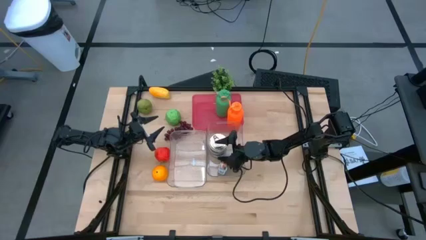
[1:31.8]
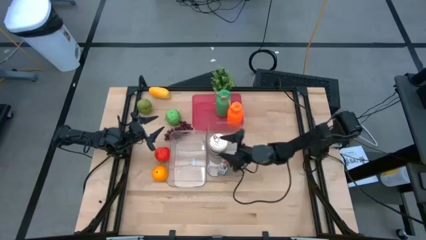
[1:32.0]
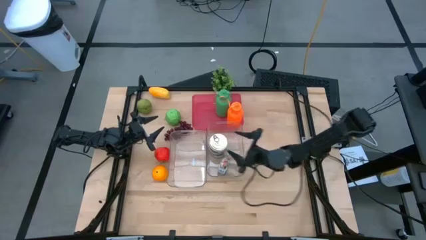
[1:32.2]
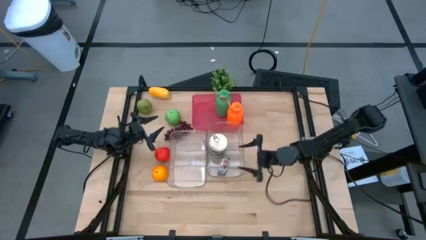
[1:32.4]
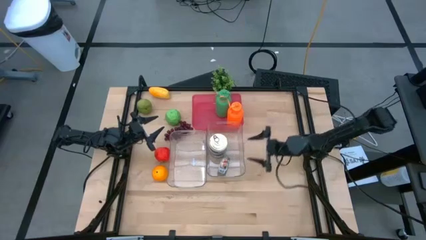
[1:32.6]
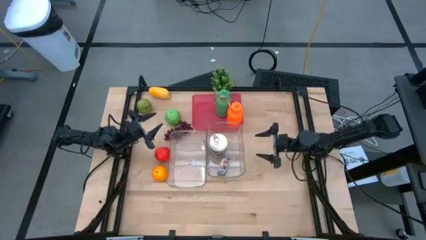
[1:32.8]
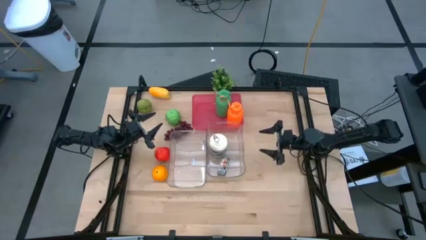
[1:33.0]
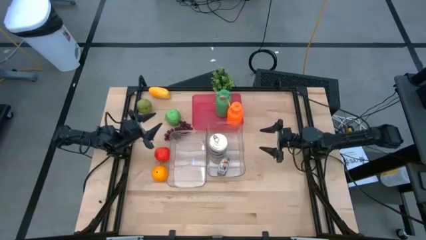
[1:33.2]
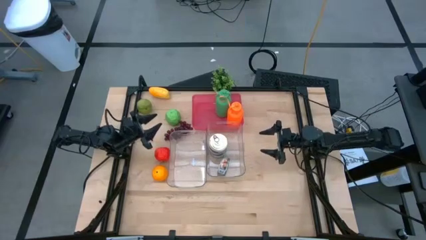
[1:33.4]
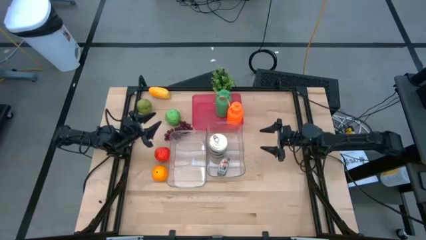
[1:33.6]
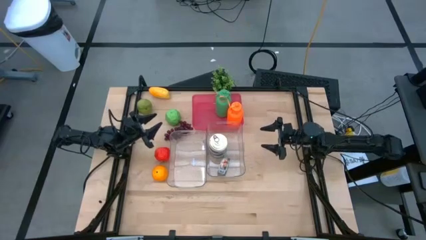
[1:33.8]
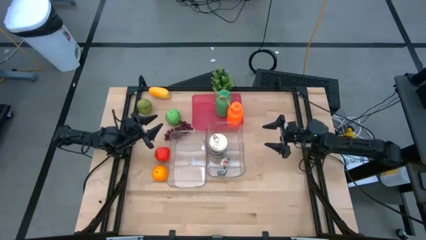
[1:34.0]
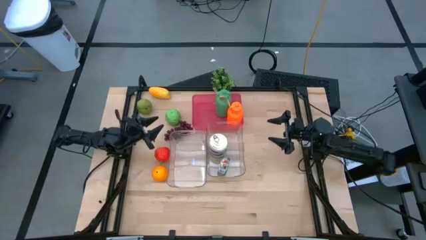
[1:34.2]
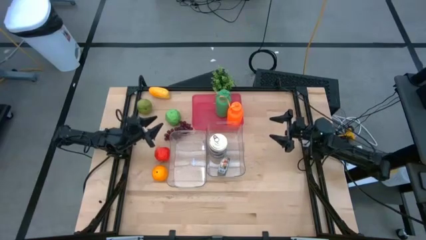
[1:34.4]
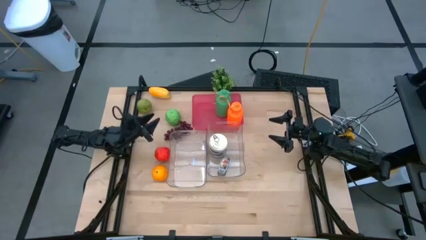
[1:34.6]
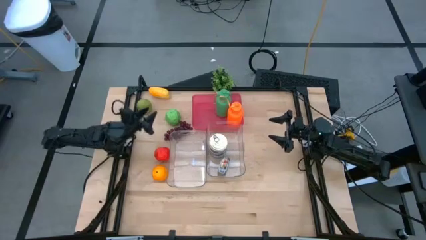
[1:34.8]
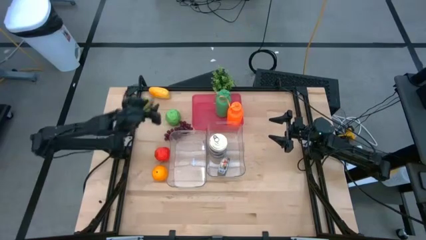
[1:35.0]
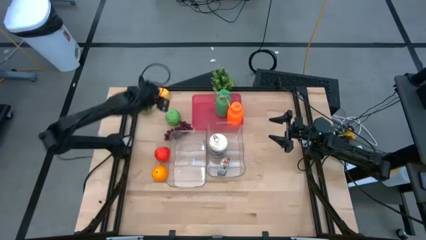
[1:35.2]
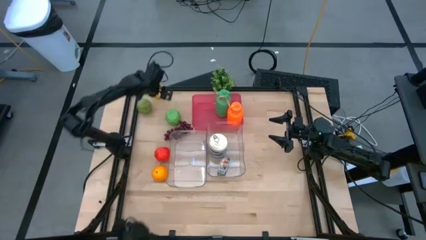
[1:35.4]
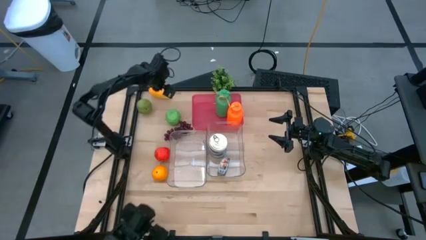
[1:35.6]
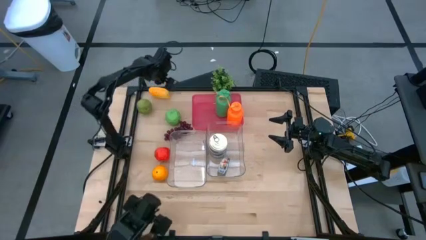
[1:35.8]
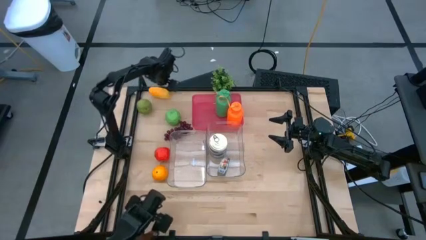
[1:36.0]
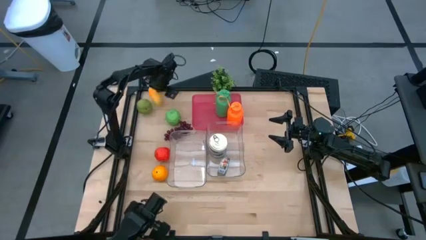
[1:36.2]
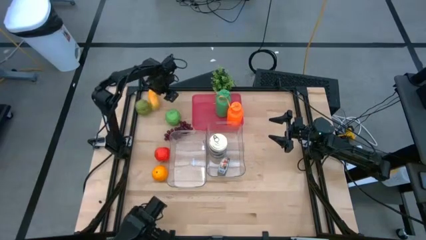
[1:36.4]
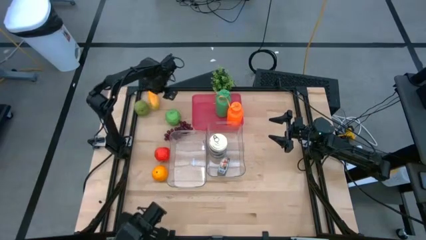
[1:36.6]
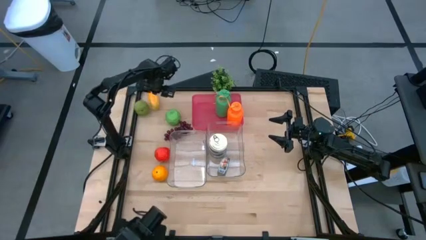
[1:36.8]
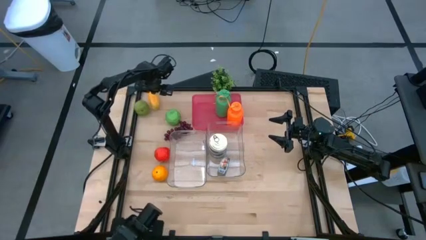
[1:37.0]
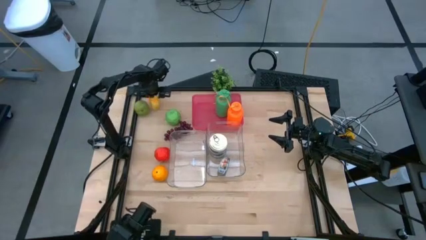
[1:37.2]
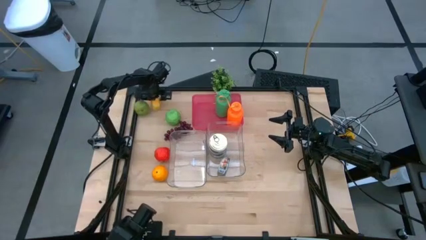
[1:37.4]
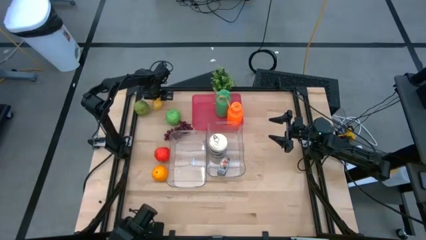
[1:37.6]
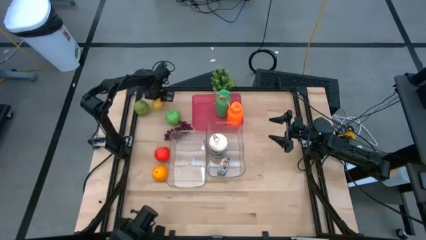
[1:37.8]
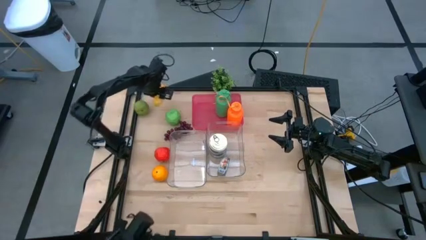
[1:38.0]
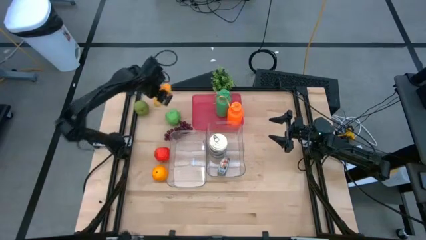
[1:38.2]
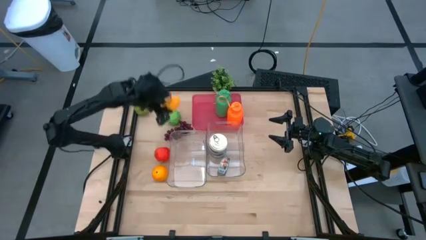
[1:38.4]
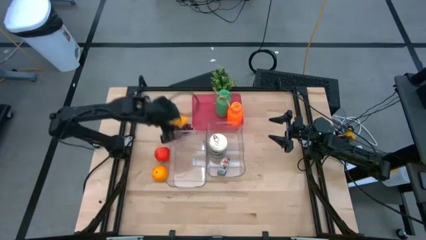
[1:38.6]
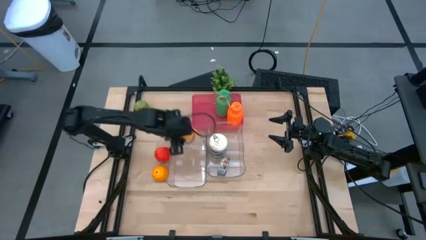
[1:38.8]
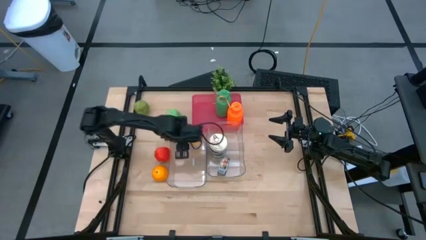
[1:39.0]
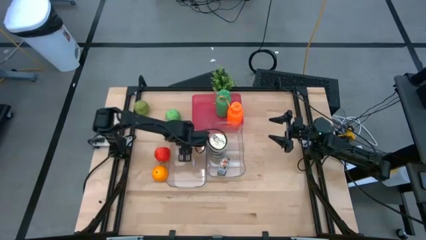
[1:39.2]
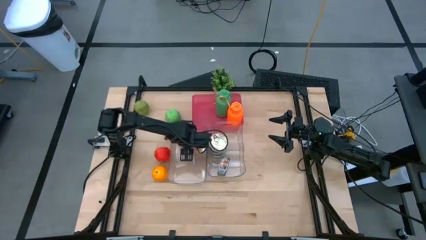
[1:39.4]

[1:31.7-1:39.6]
Task: Pick & Place Food Item
Put the yellow mango into the left transparent bin

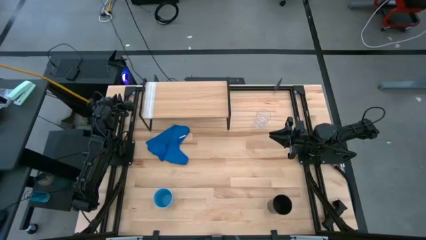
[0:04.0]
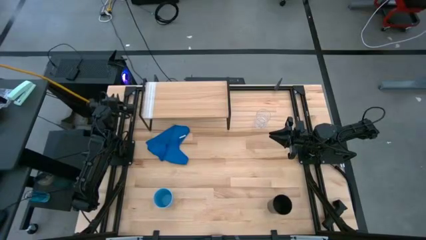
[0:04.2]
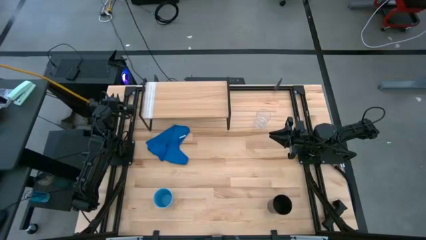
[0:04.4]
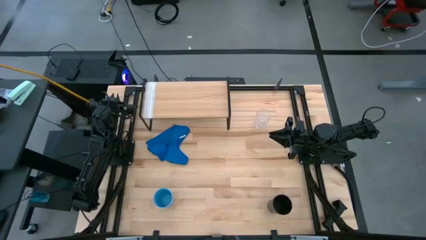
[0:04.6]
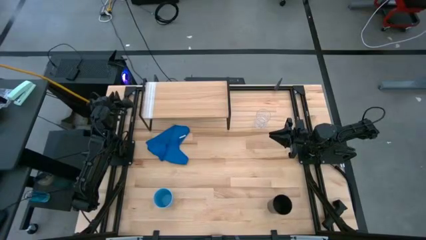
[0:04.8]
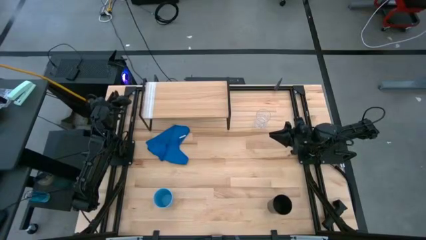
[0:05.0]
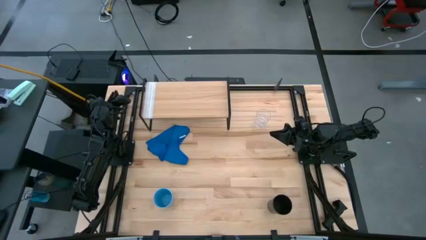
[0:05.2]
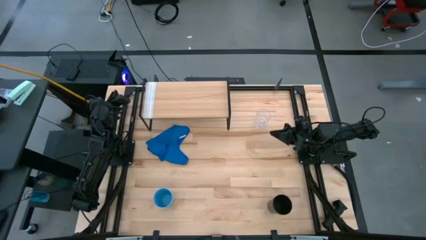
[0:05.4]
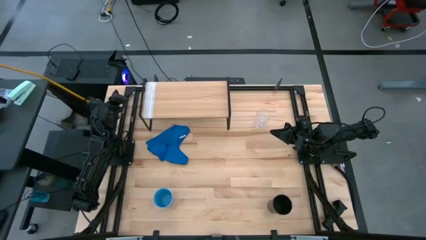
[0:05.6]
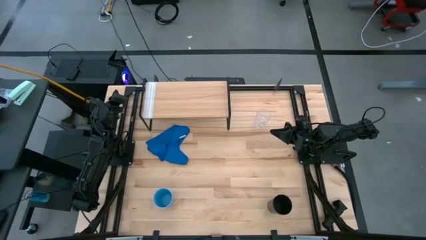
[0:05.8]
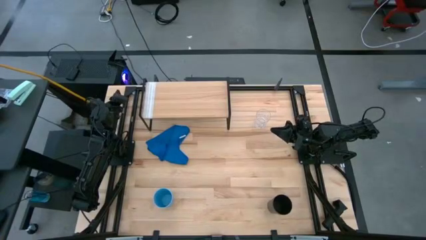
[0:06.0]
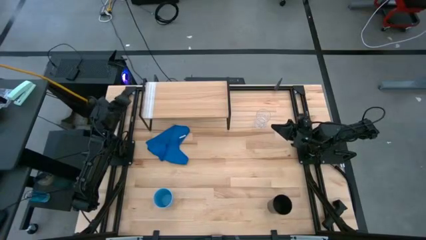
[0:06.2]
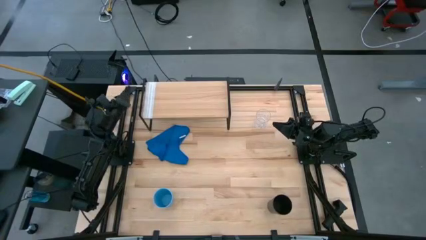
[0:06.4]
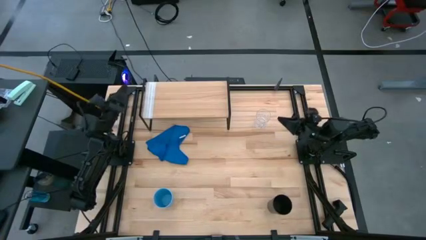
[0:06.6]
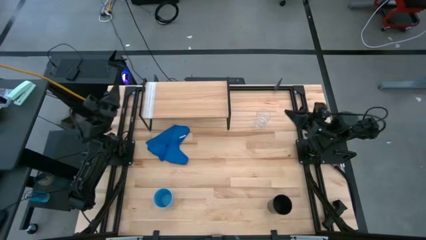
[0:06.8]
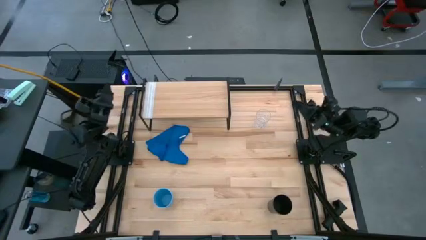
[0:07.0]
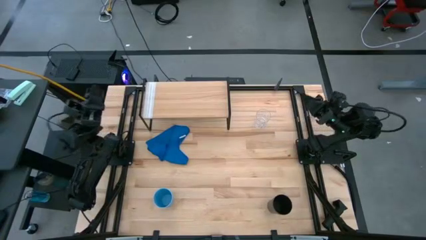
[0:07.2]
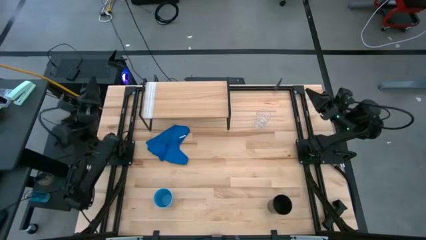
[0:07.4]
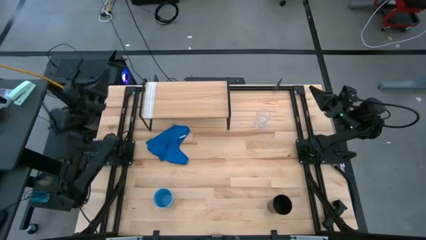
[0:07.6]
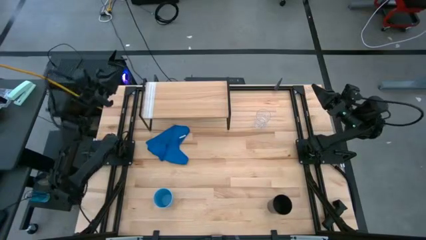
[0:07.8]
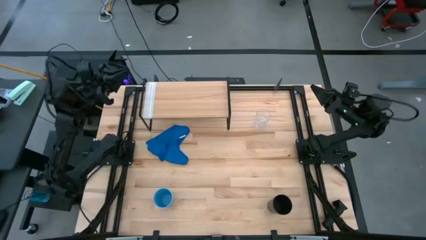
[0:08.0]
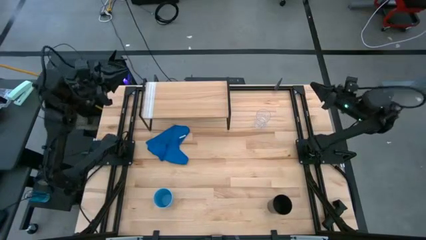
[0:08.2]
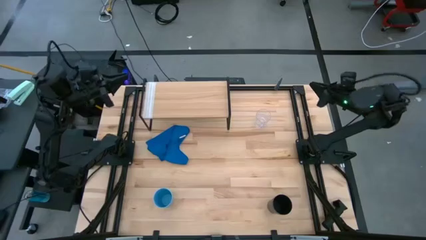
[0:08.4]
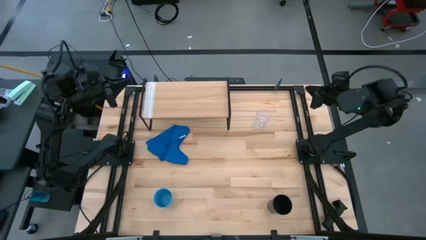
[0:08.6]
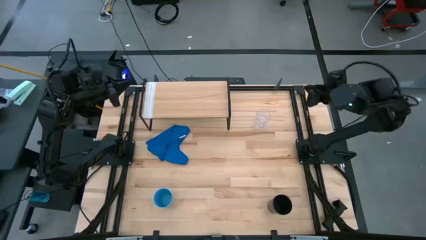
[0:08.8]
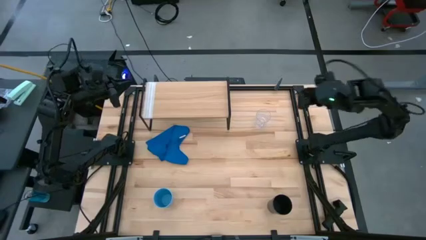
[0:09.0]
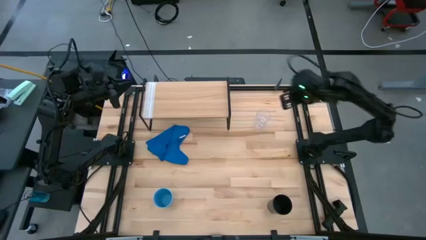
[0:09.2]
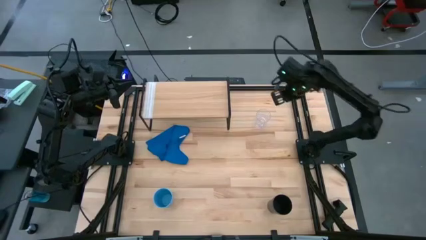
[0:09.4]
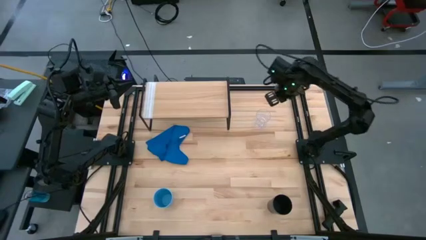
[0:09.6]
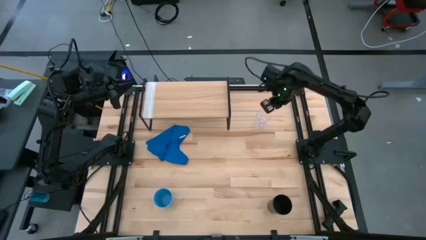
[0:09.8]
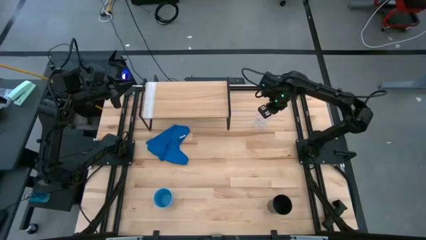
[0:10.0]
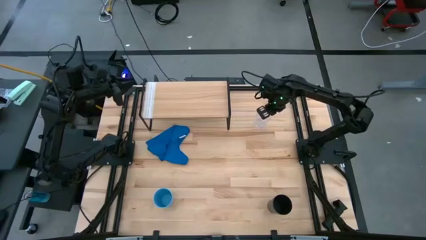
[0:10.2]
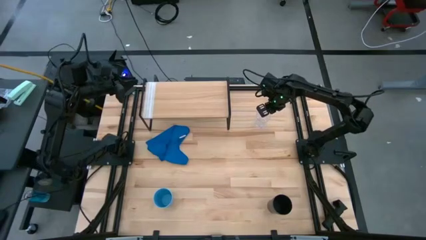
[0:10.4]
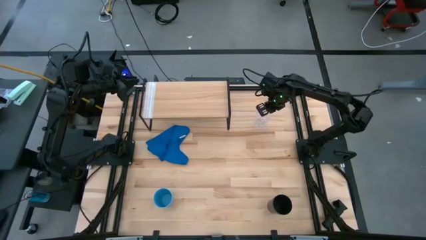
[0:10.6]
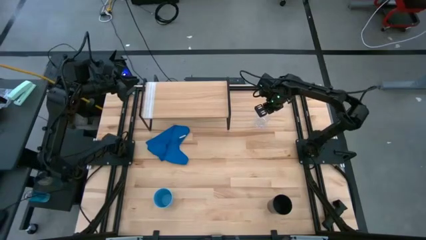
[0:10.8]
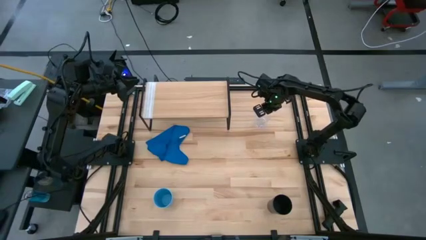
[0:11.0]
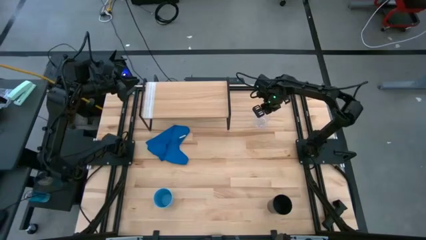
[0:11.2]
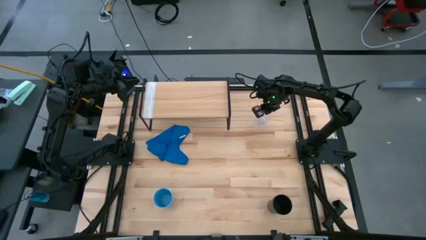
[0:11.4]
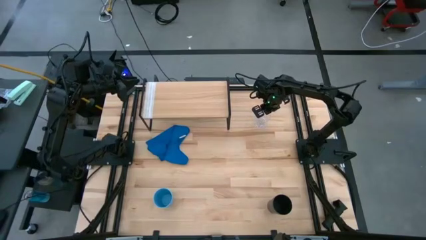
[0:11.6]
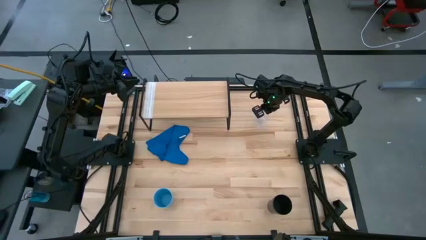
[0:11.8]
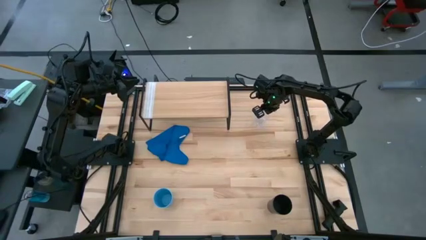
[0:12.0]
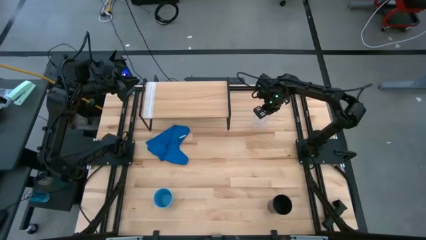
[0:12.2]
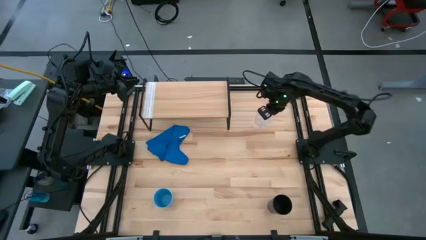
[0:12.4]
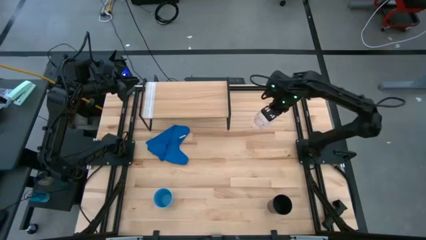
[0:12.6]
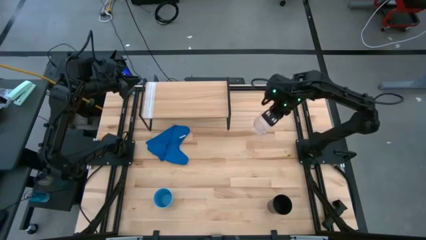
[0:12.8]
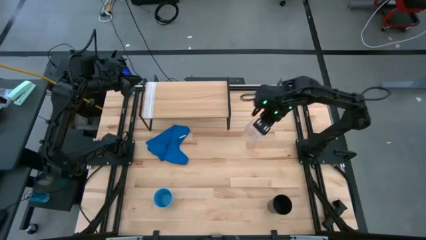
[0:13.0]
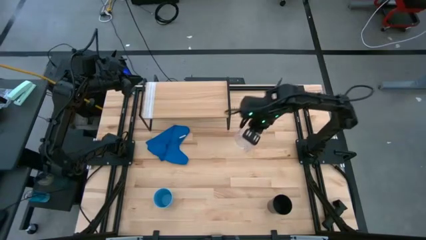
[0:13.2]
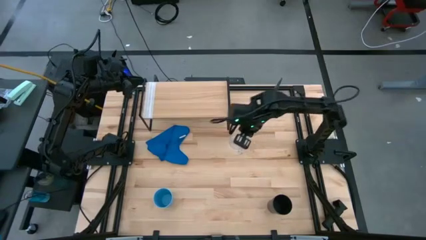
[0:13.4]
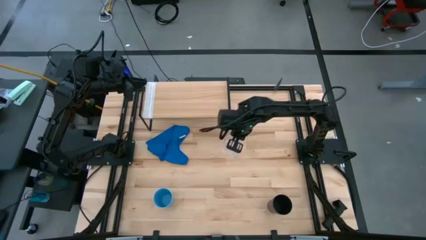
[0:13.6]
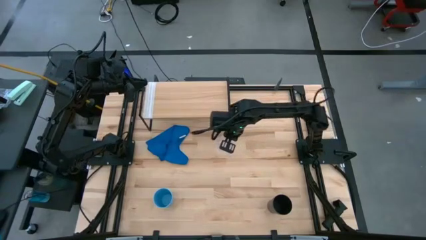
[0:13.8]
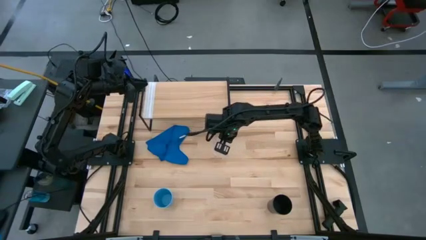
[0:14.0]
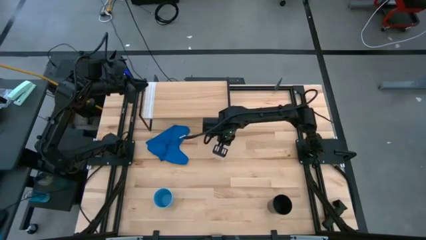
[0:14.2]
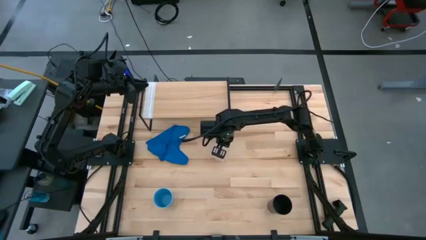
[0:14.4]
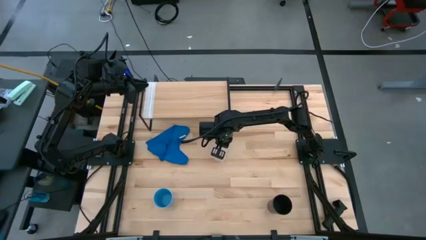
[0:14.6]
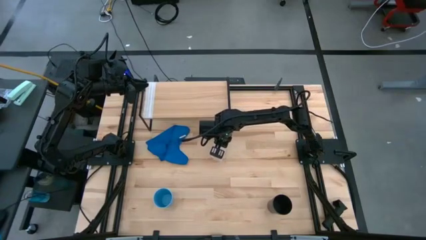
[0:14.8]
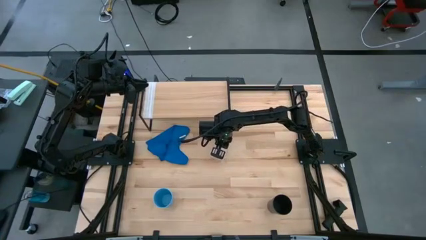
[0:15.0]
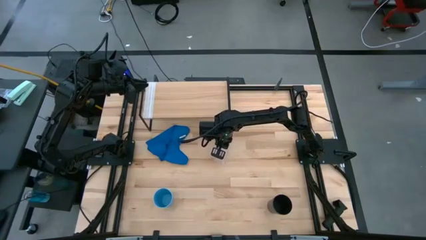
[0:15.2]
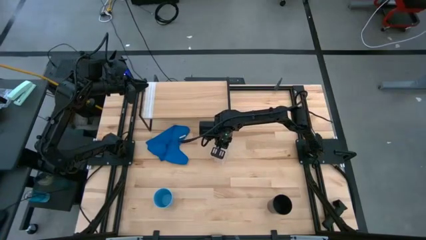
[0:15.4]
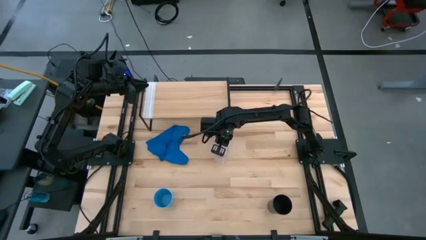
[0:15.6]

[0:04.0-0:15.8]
Task: Stack small to large cups/mugs on shelf
Move the transparent mug to the middle of the table
